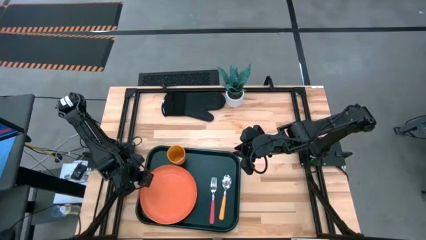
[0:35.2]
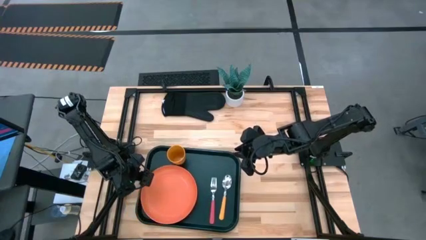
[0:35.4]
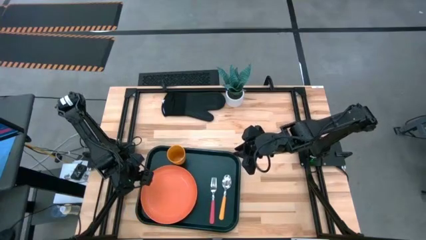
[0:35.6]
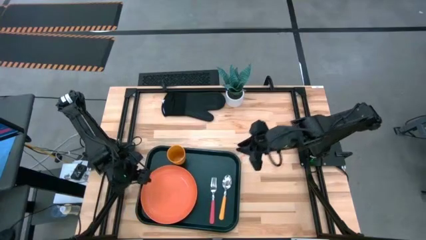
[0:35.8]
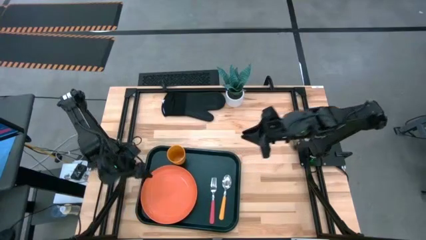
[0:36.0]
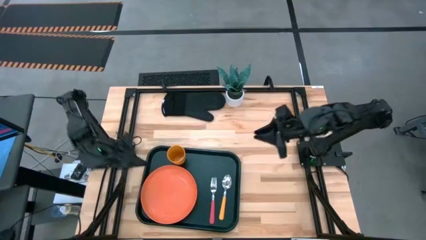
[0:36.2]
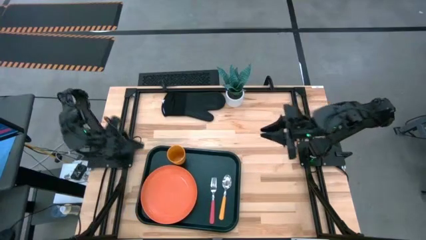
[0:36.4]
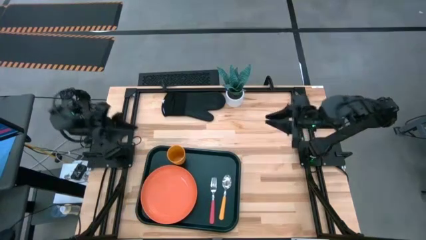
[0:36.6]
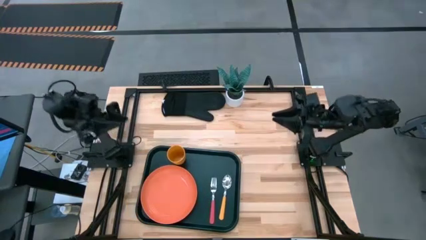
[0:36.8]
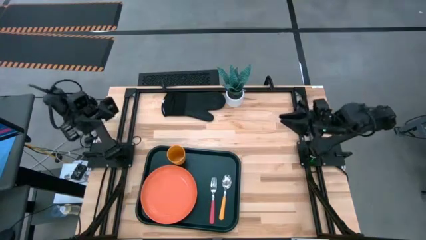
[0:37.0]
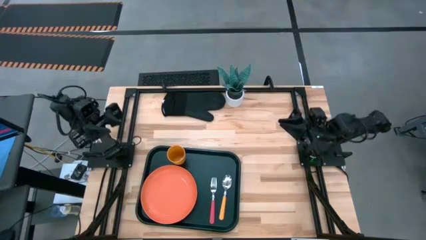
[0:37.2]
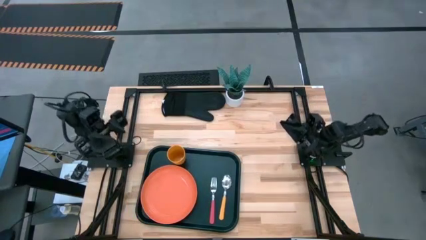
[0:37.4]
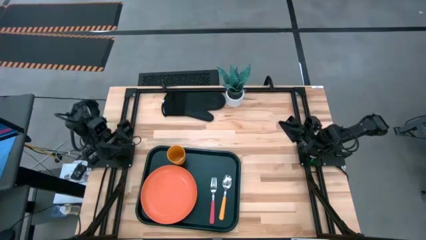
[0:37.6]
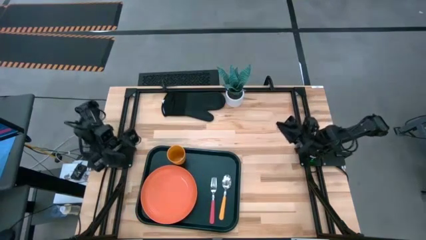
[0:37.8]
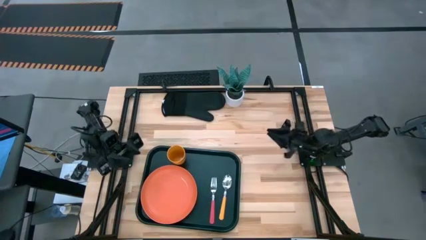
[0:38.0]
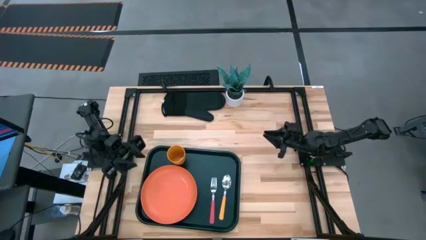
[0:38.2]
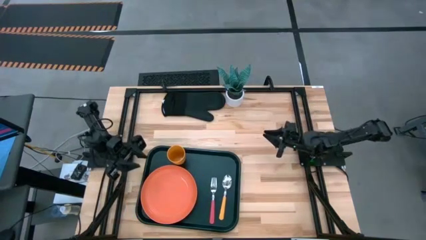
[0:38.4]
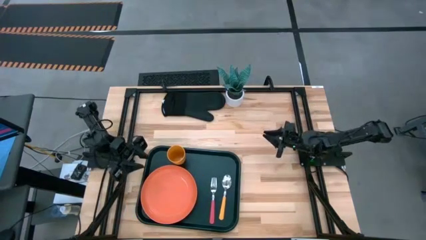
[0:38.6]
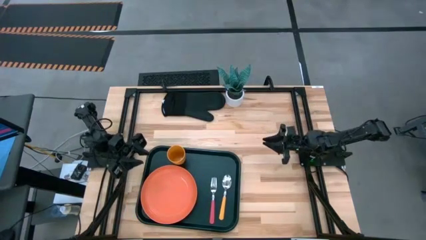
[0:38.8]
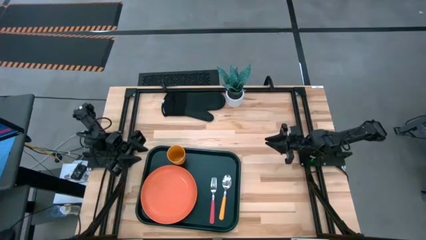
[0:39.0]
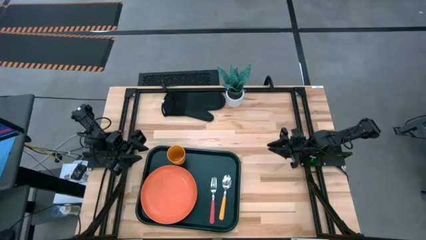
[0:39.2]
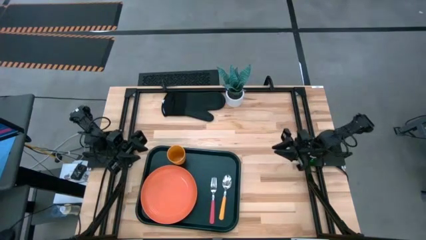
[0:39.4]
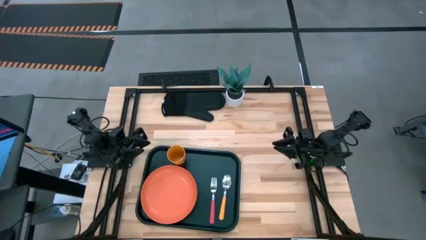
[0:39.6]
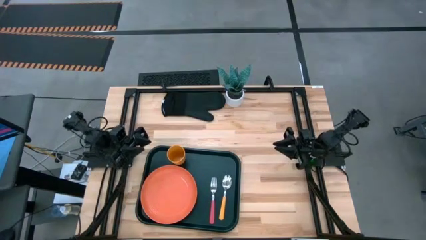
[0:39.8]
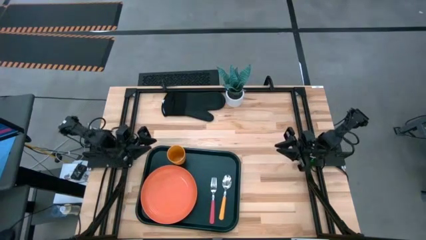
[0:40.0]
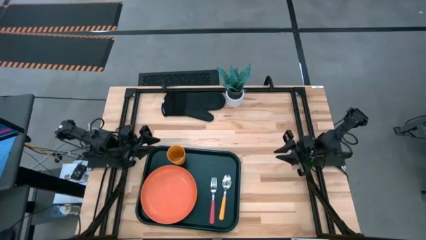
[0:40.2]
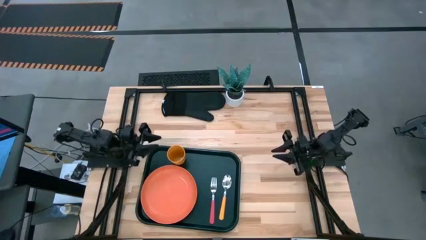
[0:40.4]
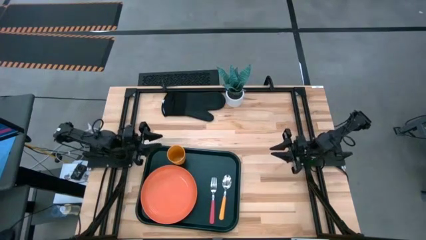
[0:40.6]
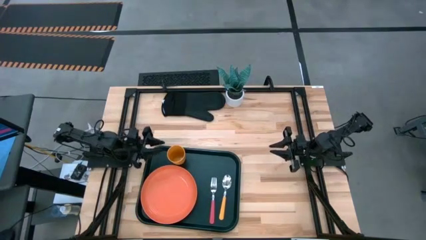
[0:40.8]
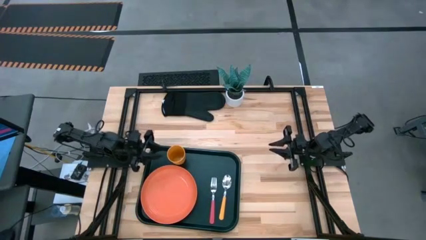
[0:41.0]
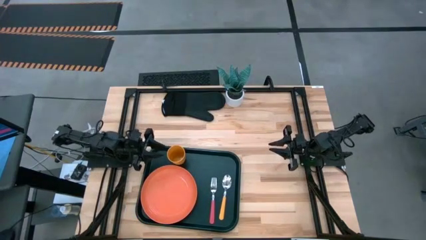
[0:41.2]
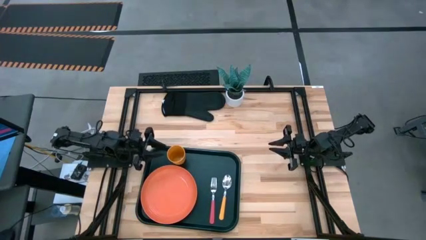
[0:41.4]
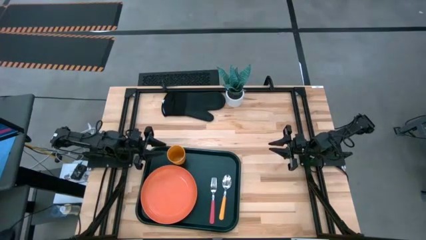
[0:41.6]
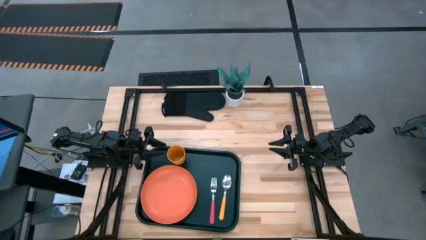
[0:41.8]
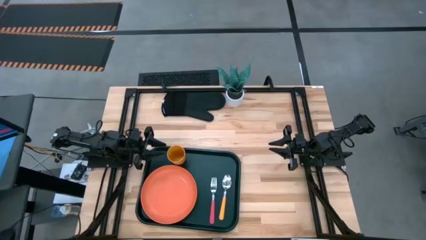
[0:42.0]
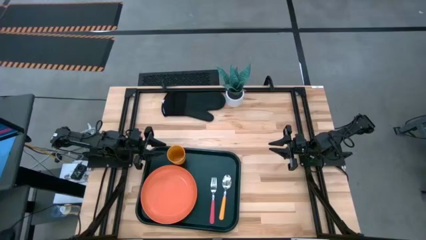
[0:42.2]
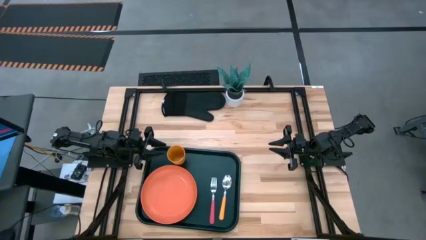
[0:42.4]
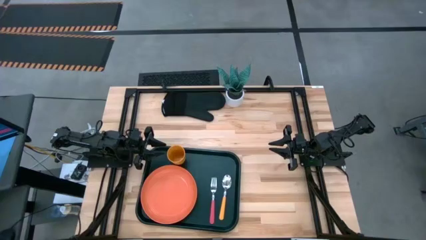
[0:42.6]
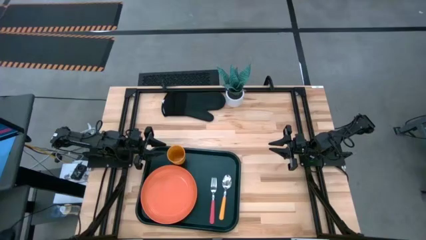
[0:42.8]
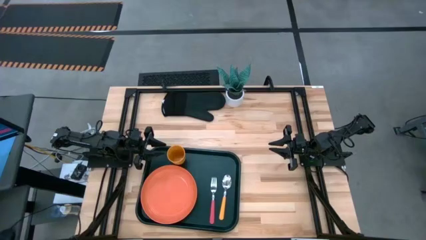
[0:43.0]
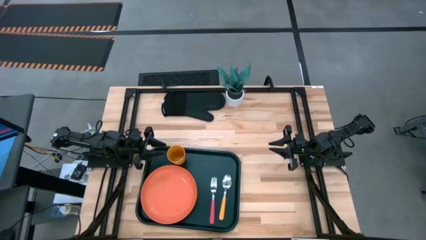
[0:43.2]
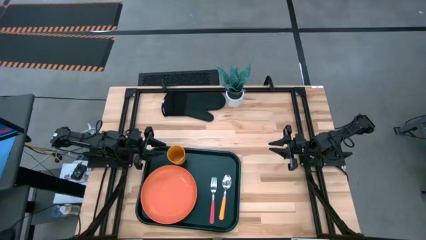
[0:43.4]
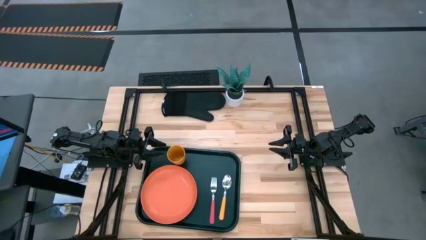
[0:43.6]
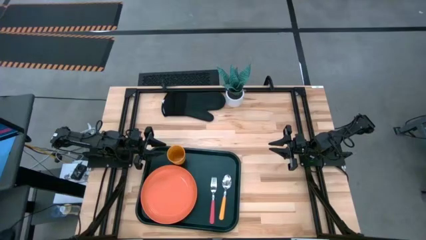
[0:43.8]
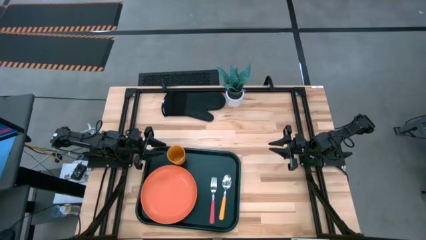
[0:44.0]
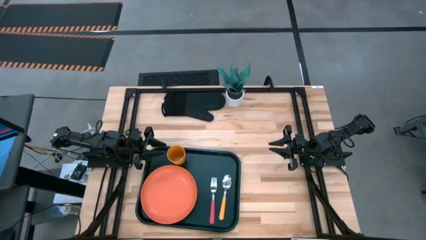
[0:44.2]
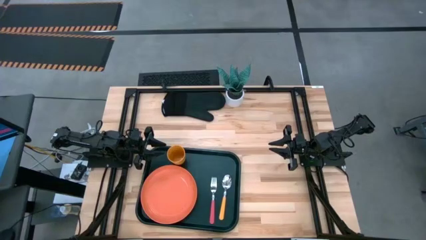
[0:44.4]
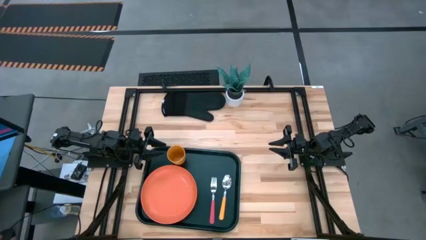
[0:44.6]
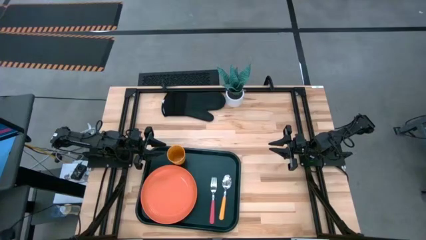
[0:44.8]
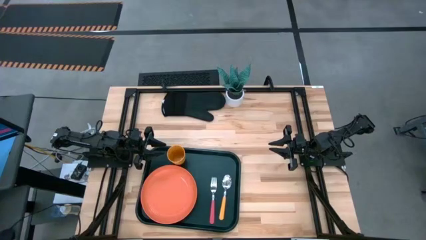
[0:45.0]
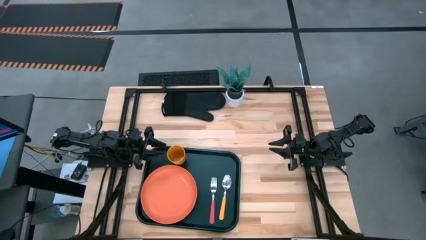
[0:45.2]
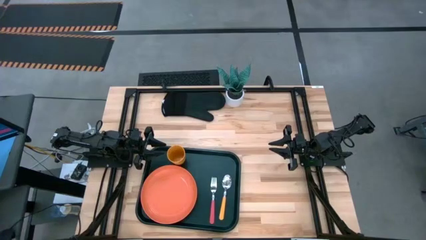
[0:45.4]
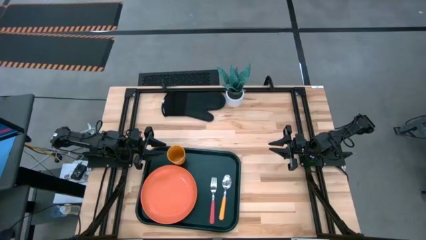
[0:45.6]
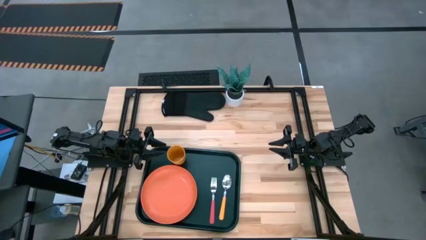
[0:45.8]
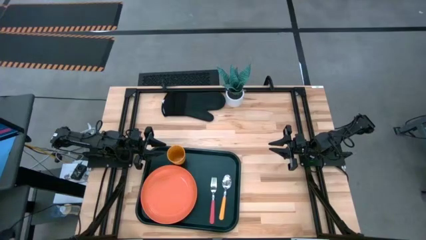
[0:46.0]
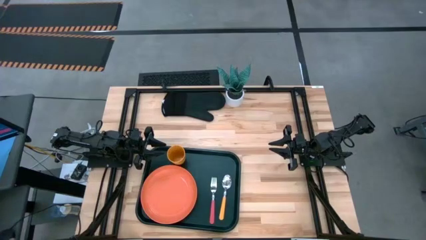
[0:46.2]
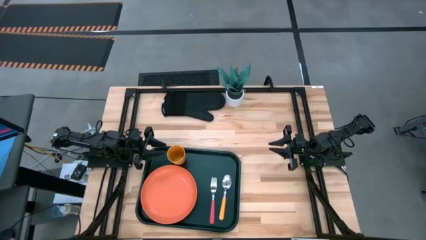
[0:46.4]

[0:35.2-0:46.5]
Task: Pick and place plate/cup/fork/spoon on tray
Return to Home Position

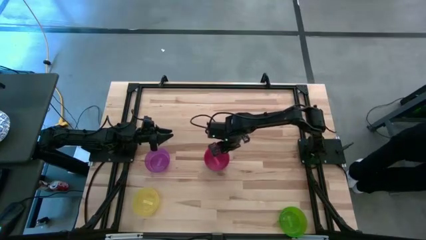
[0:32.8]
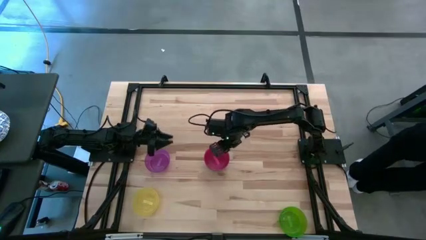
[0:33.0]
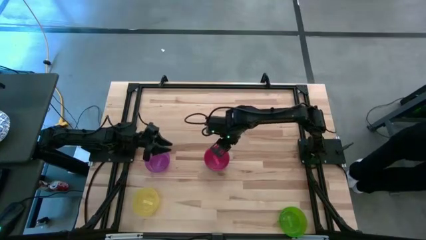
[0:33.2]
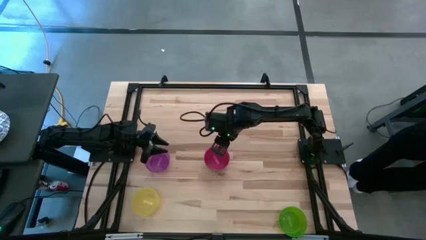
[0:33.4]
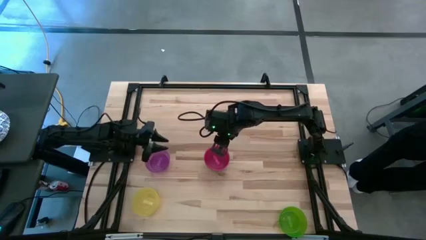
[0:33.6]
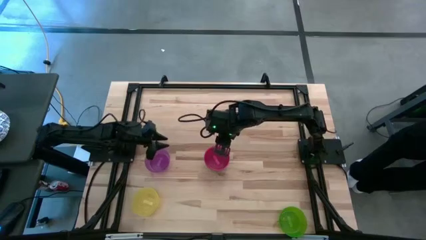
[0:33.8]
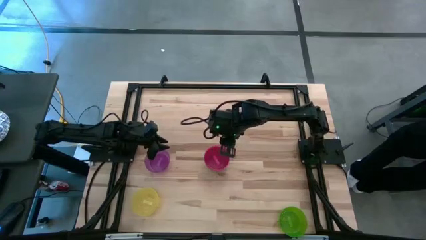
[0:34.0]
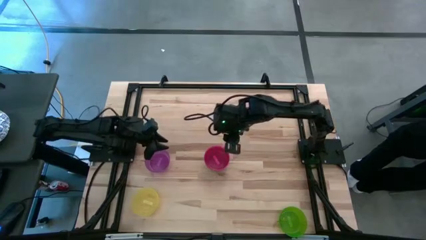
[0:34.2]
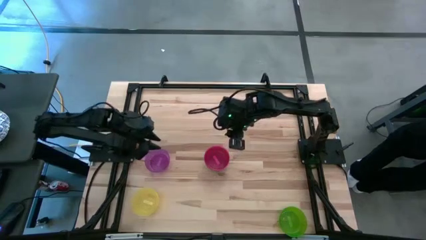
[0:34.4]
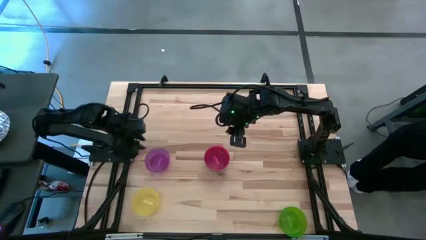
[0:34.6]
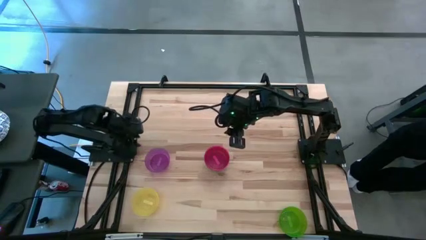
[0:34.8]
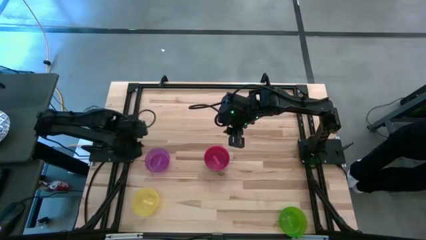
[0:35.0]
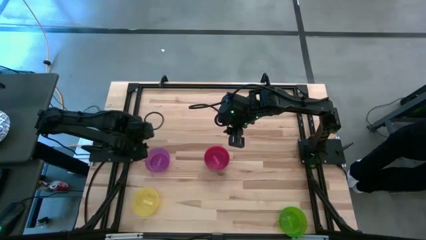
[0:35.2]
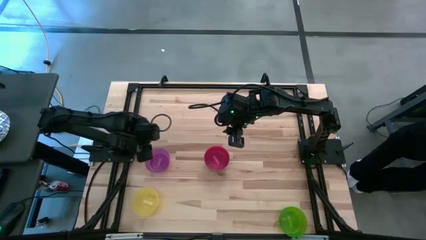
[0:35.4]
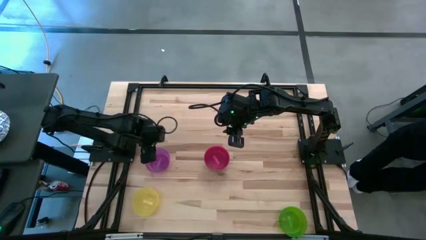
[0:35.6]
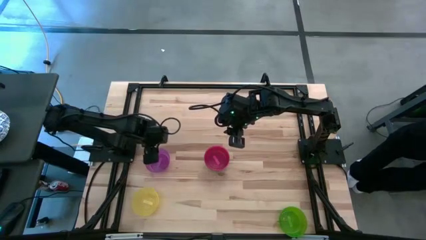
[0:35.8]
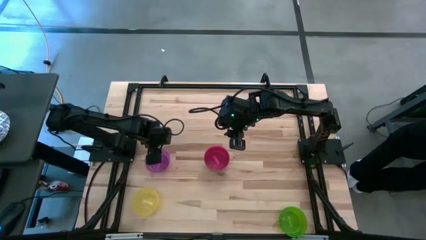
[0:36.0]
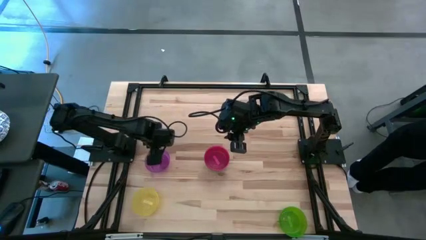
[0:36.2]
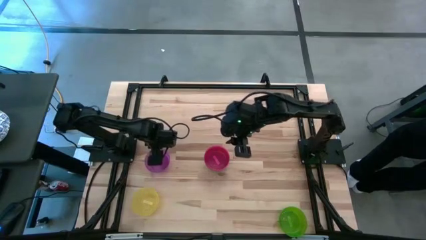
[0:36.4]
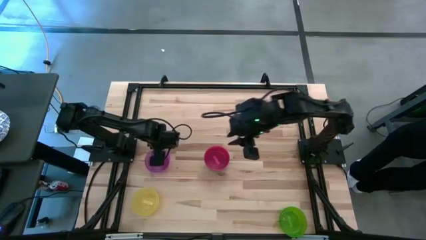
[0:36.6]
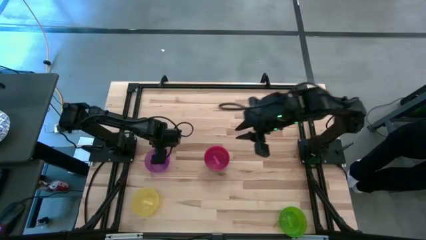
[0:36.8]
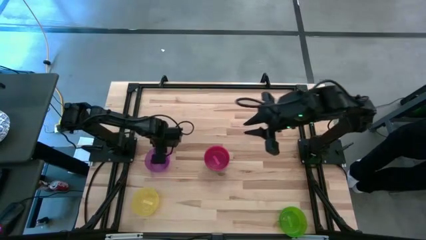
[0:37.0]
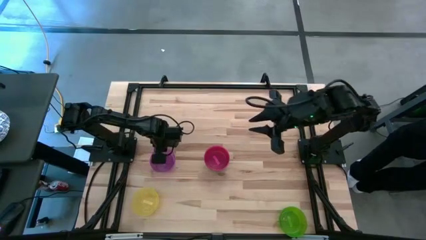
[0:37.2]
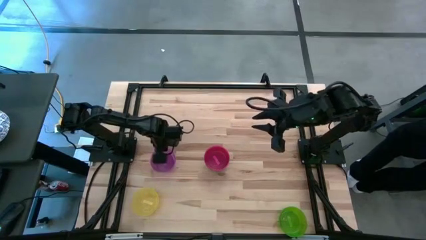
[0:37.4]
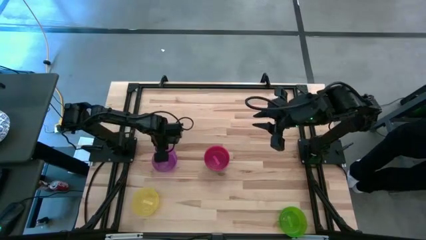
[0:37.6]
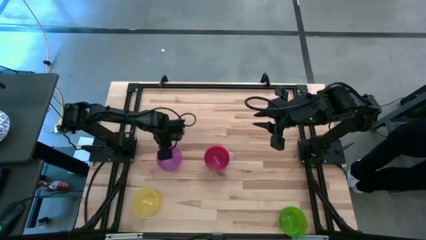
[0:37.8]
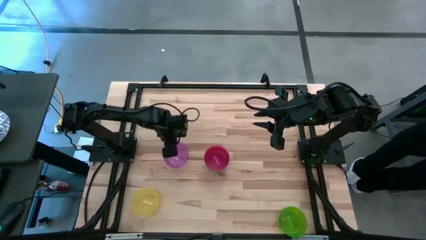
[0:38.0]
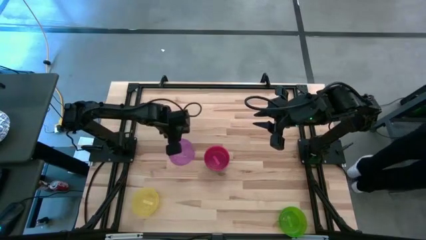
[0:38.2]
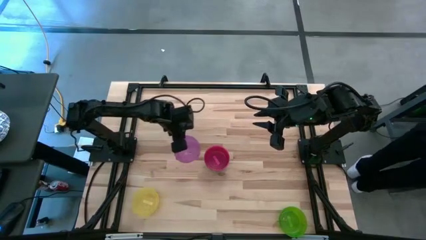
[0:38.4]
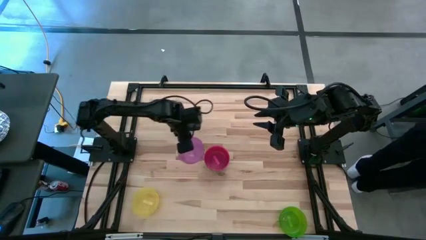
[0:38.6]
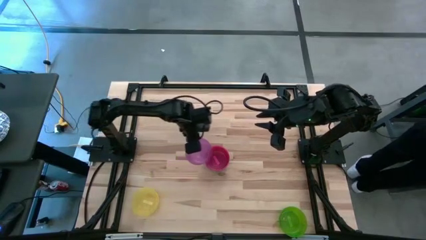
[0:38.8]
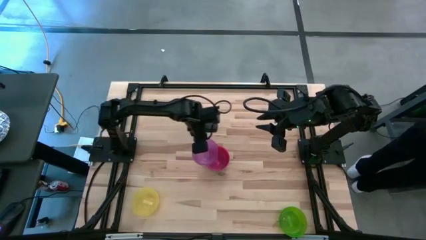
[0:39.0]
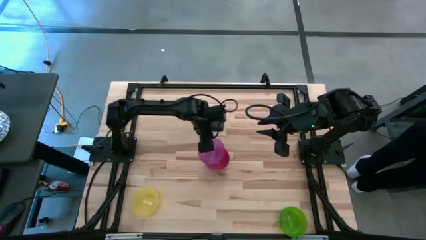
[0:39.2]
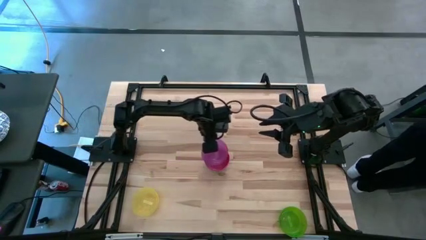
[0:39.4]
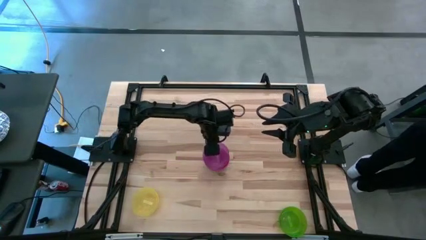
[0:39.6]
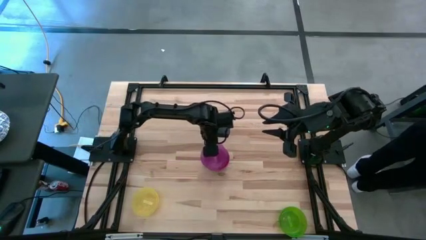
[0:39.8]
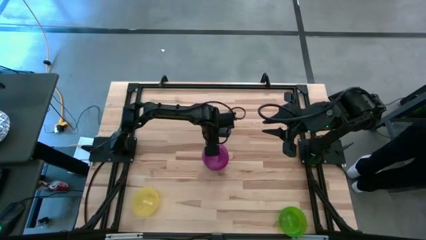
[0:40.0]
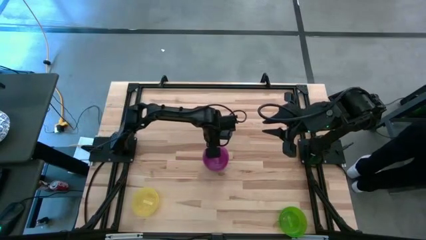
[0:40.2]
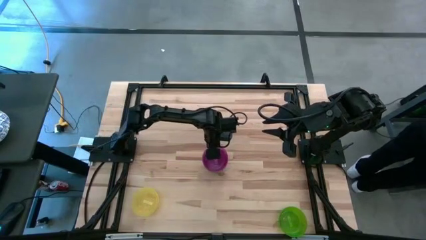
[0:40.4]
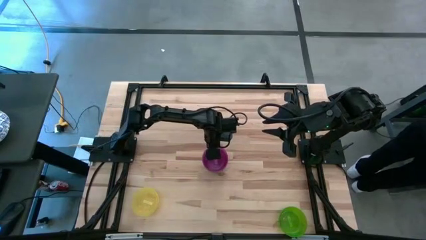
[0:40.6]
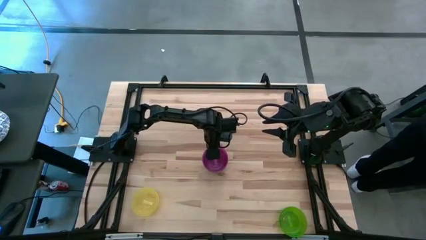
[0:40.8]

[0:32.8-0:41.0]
Task: Nest bowls inside each other
Stack the violet bowl on top of the red bowl
